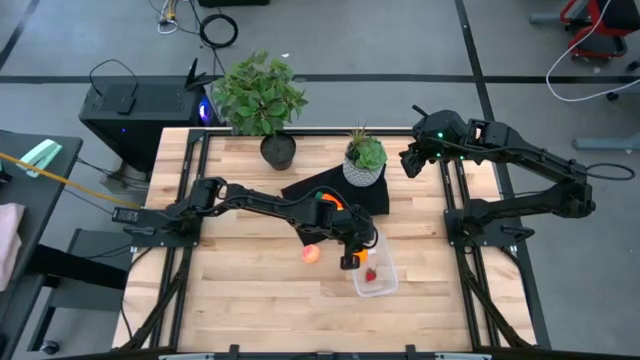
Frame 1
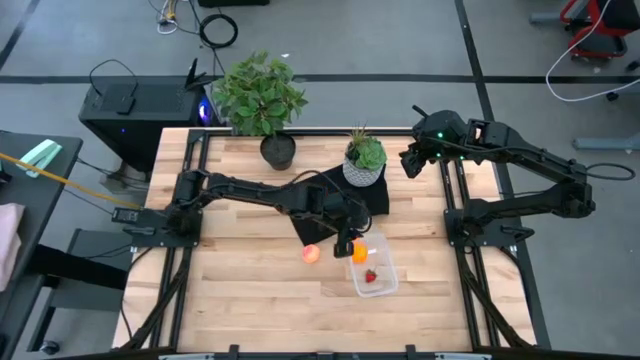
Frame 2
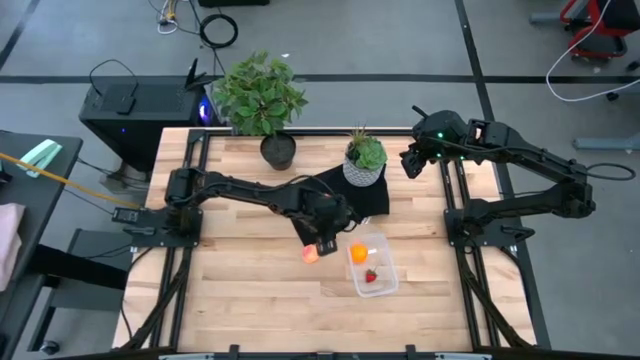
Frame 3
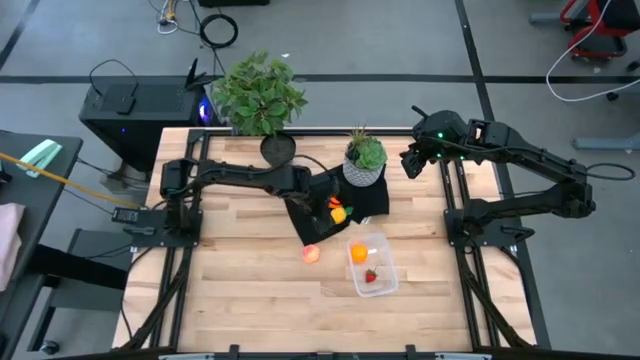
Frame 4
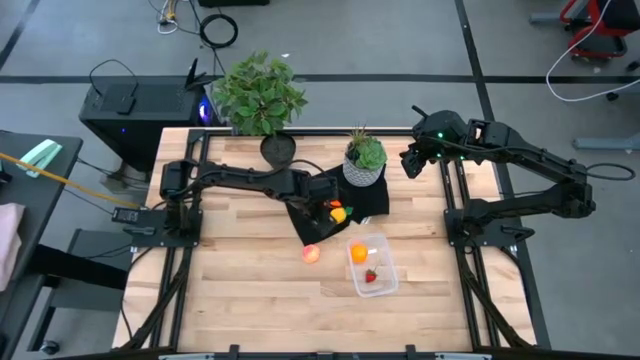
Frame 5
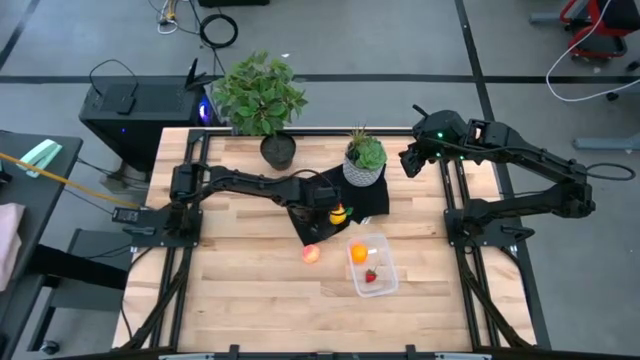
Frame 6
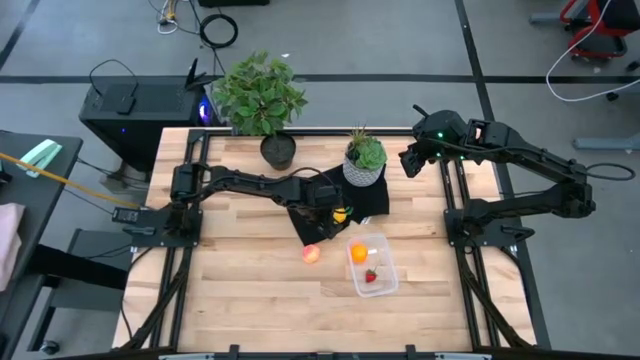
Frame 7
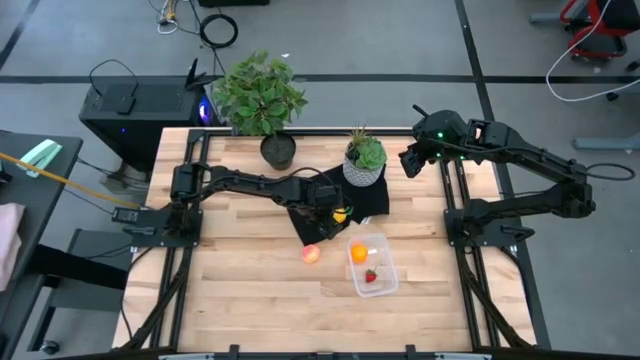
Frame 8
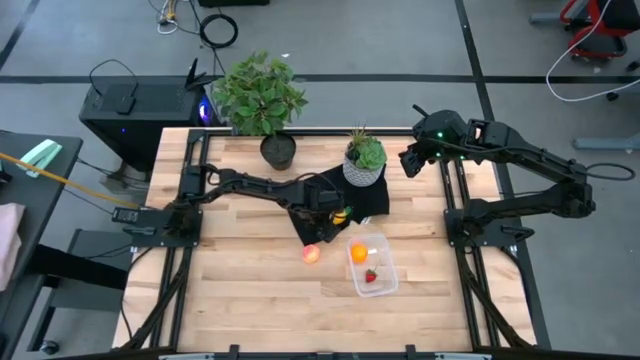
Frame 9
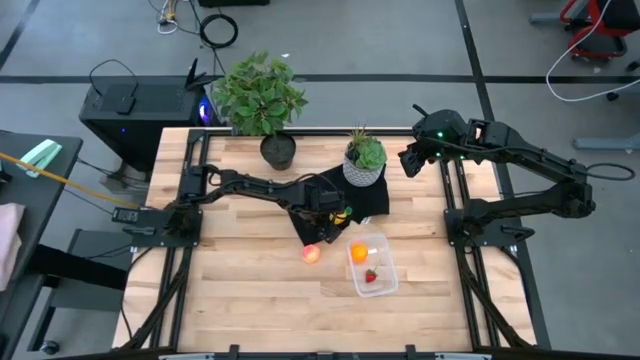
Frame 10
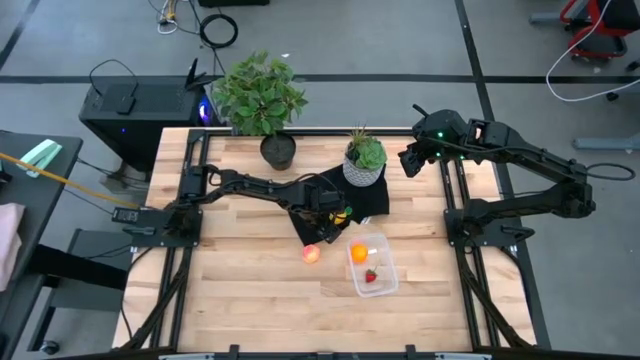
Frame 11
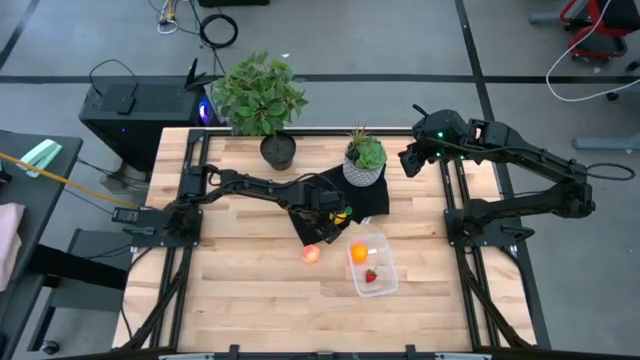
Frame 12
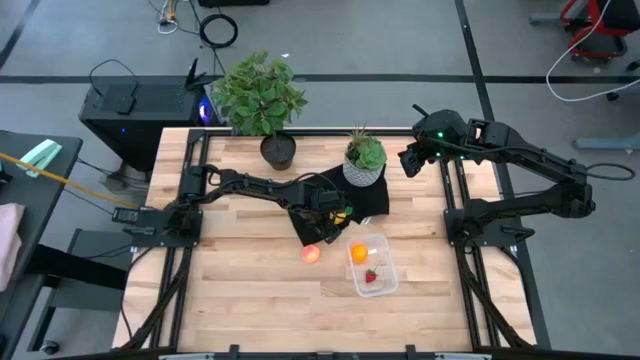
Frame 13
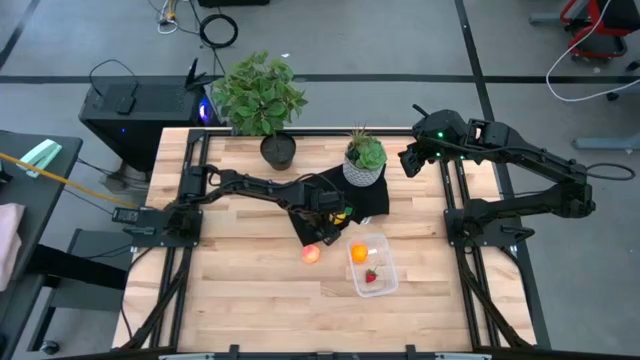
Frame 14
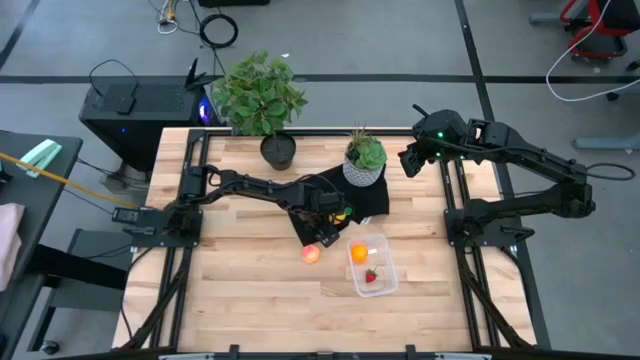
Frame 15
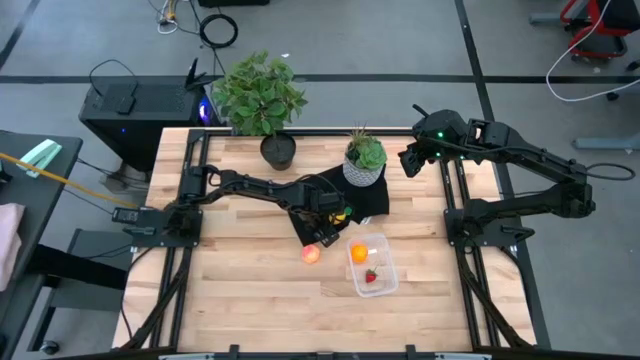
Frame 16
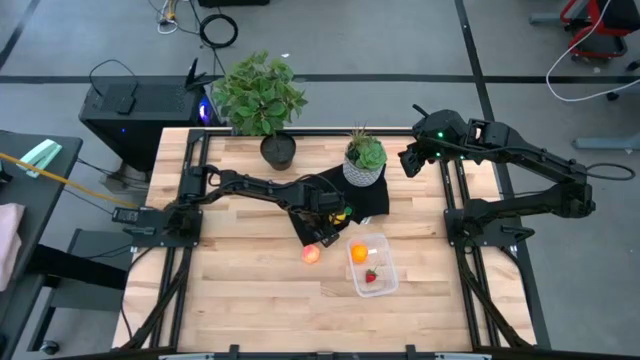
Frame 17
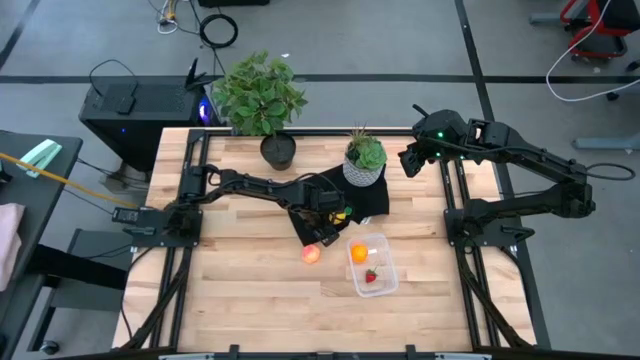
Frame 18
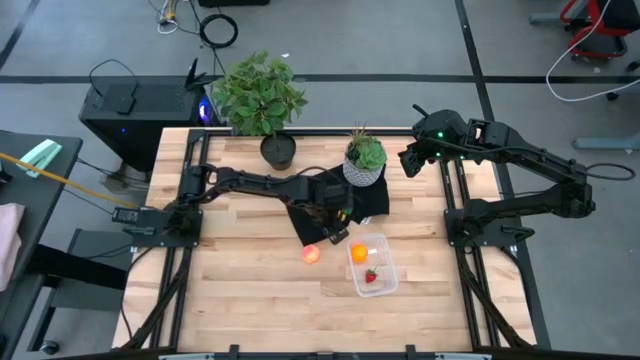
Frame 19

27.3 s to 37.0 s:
Task: Pick and placing Produce into tupperware
Put the blackberry into the transparent bin

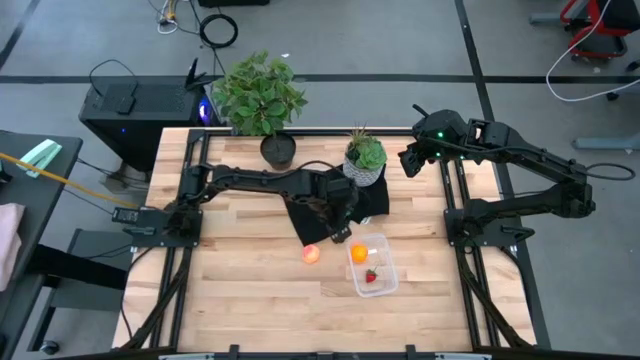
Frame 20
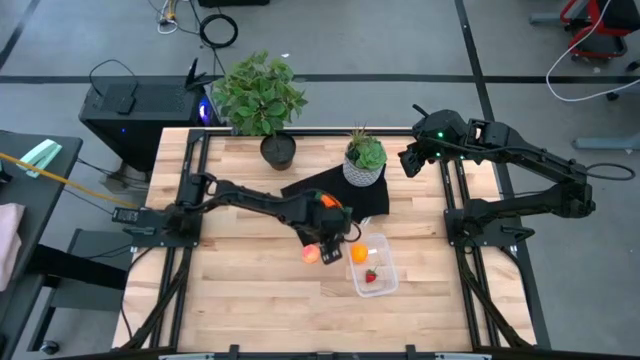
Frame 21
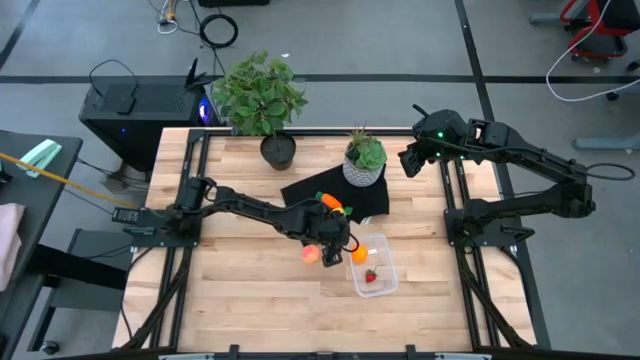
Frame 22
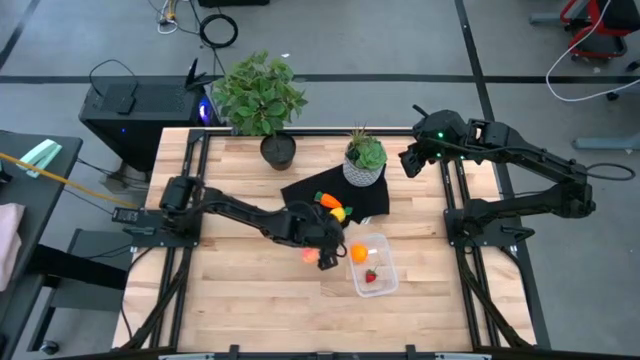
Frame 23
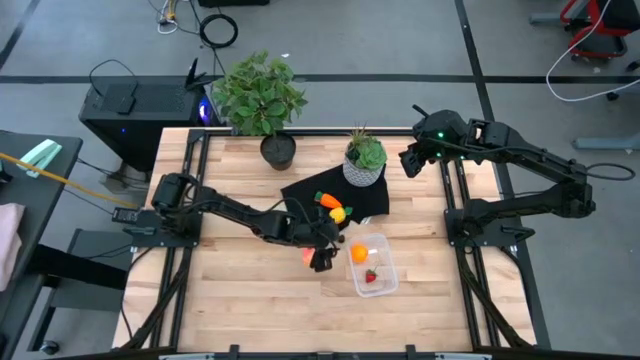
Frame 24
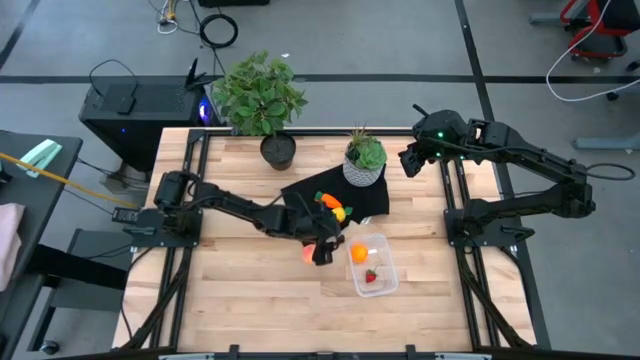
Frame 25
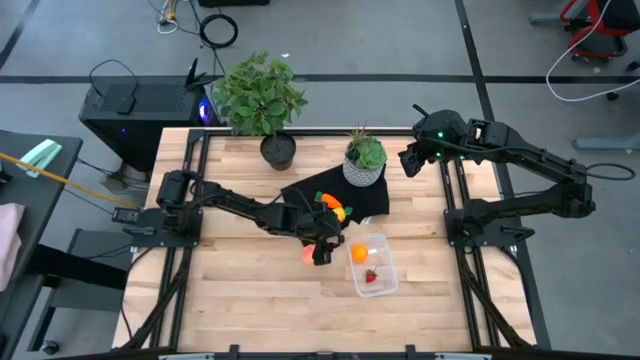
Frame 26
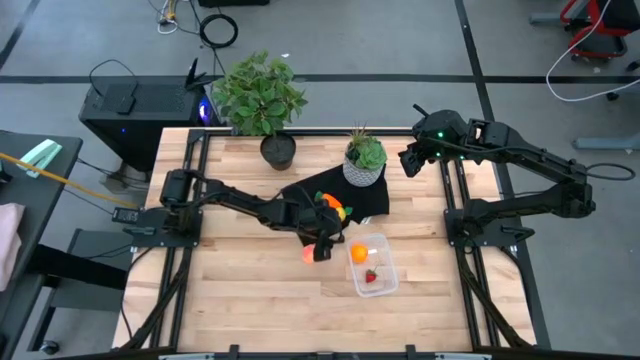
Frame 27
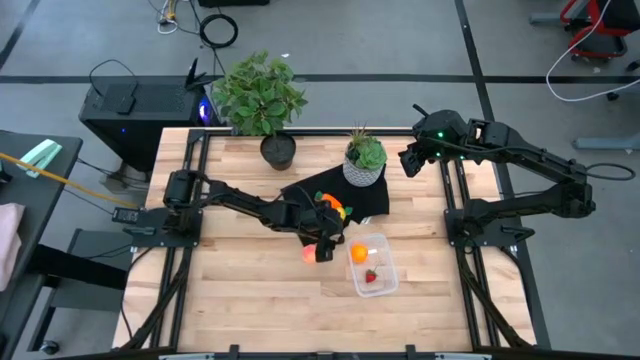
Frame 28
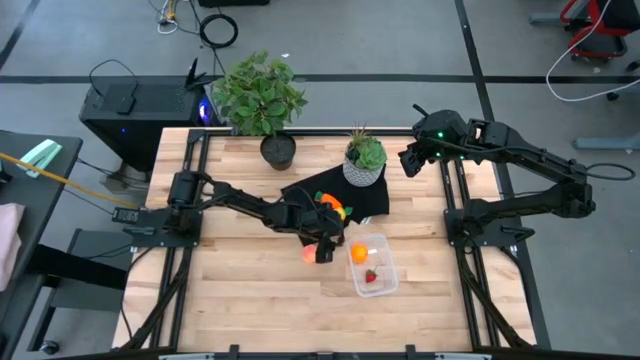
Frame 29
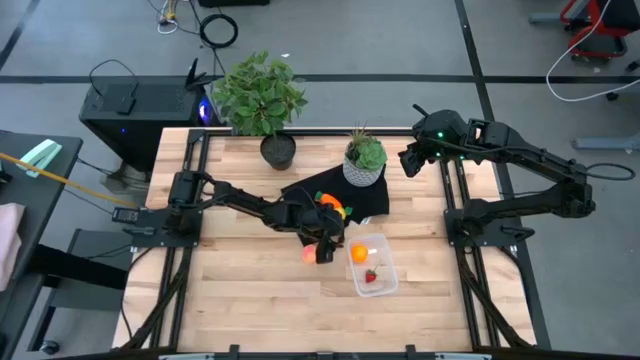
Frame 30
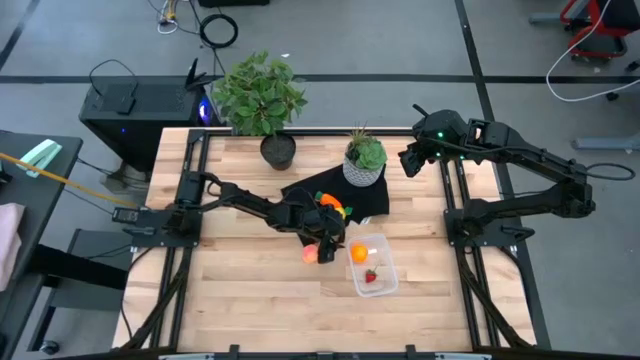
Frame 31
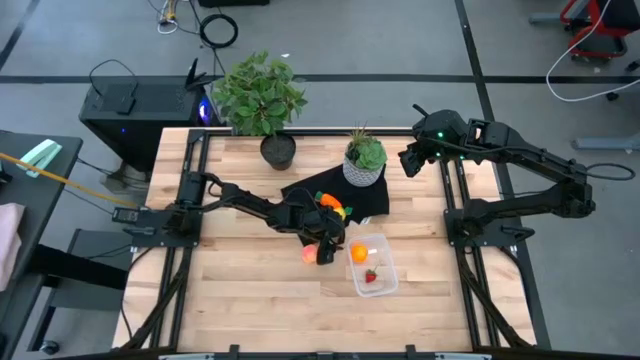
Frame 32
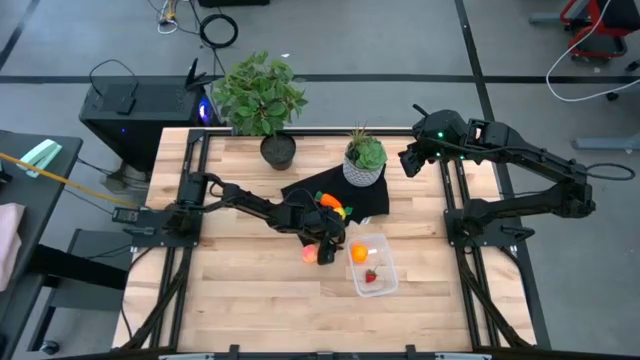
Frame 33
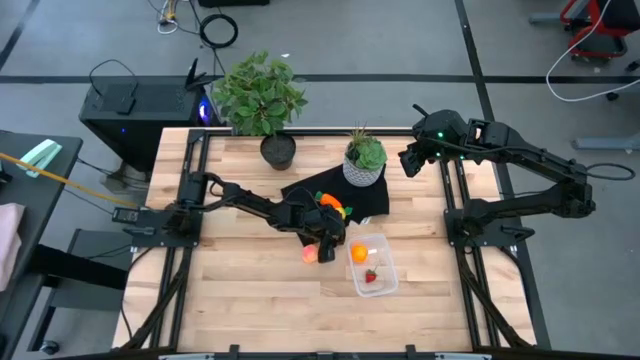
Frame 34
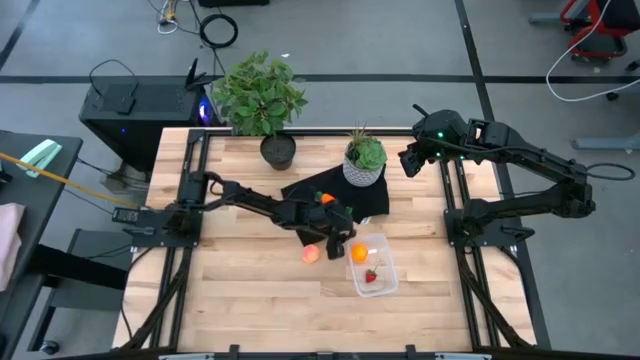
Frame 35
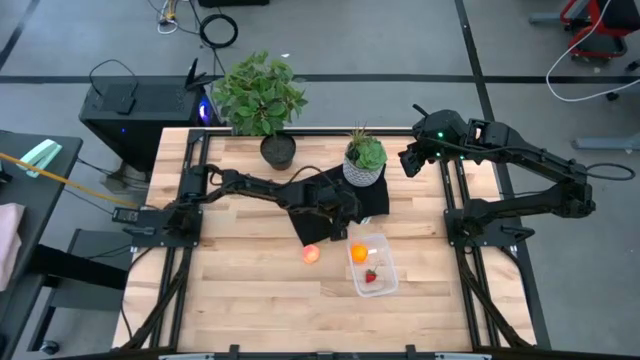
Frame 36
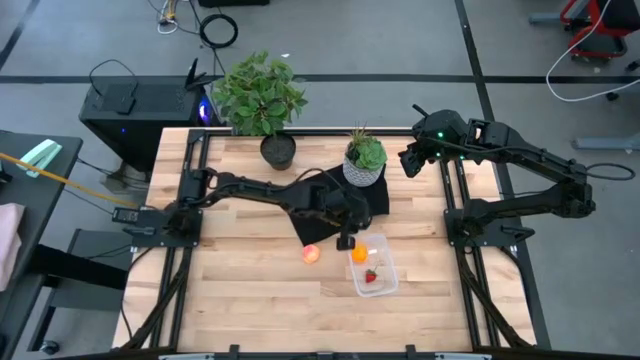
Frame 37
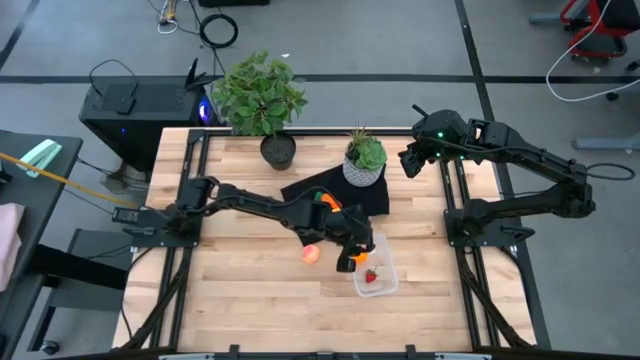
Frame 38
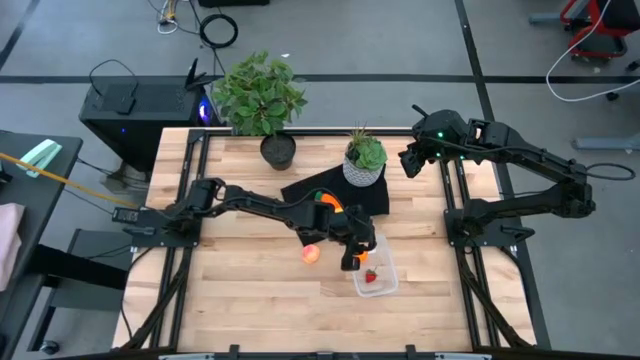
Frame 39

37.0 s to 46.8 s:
Put the blackberry into the transparent bin

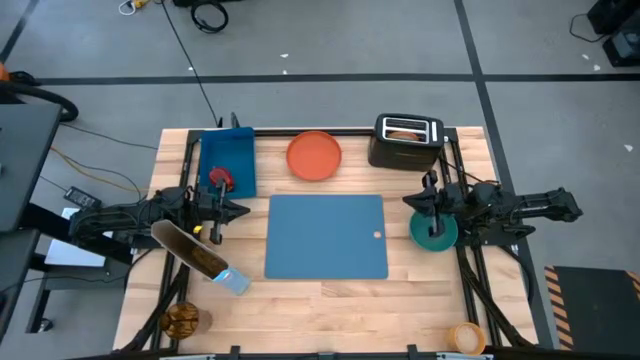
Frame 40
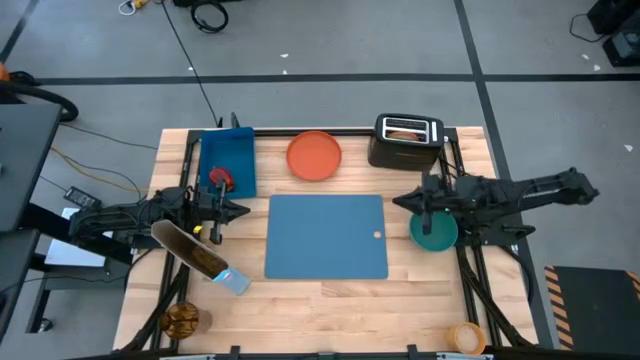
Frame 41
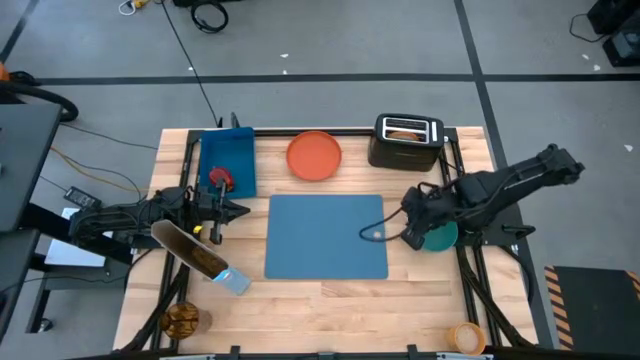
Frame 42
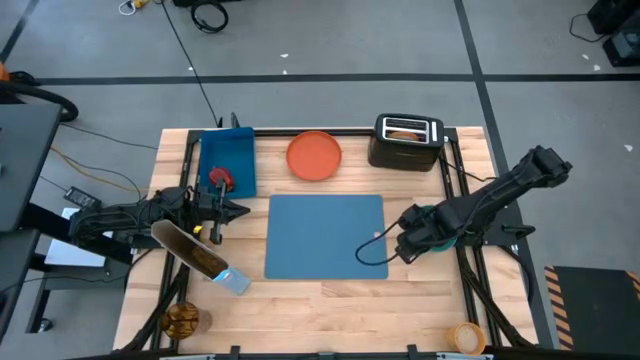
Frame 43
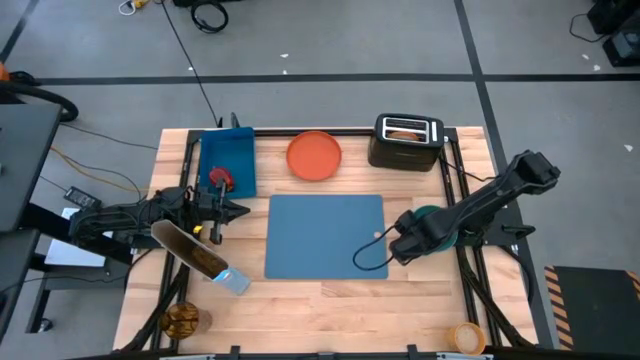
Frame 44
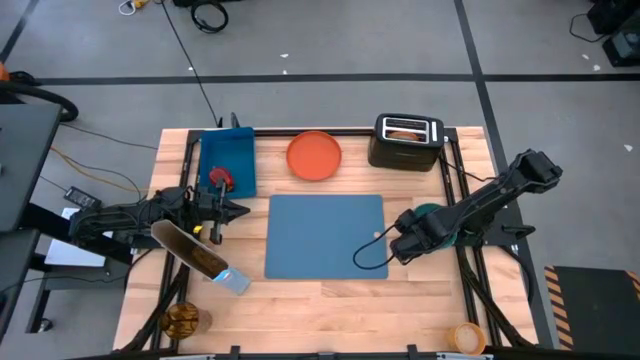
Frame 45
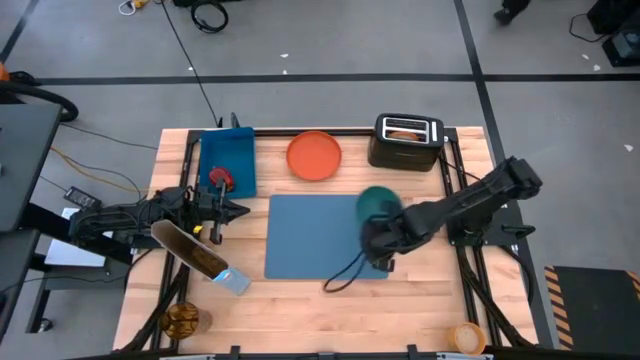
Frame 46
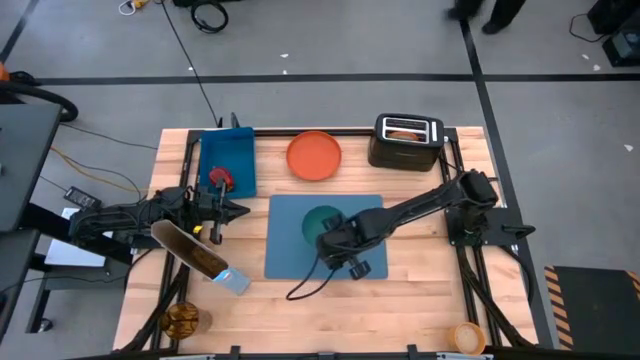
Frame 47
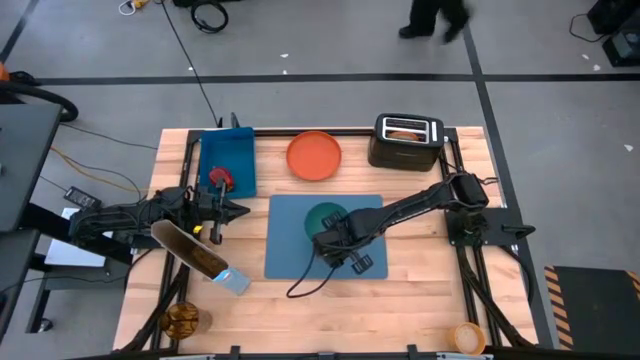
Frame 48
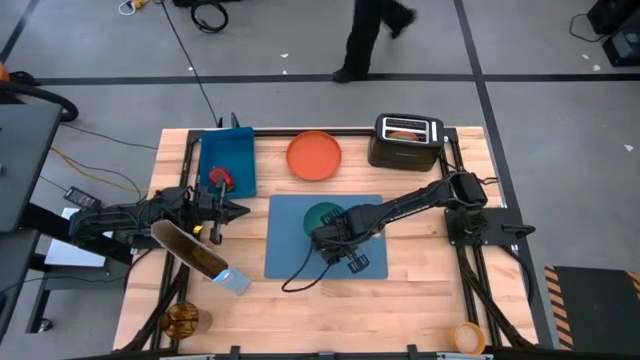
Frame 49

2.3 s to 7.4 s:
Task: Arrange a breakfast setting
Put the green bowl on the blue table mat
